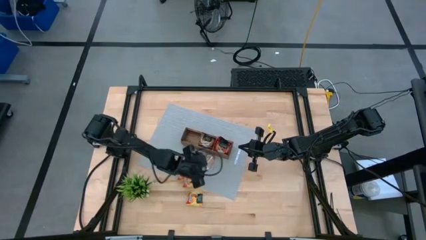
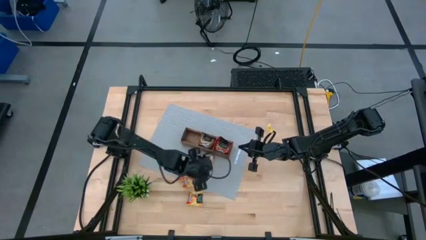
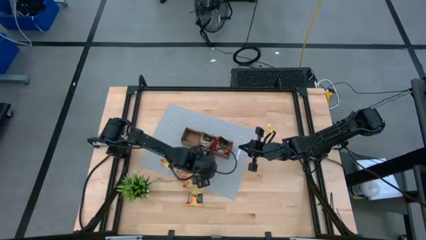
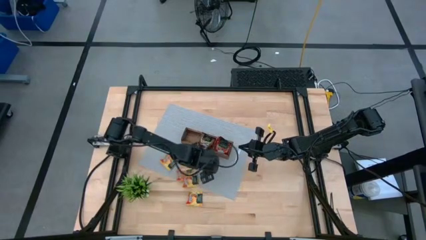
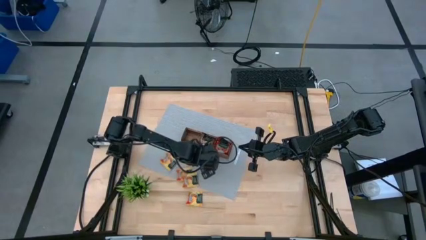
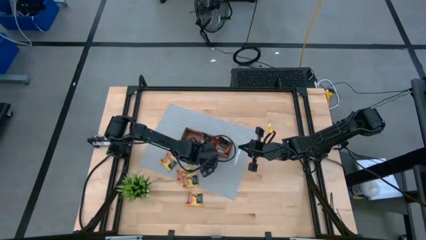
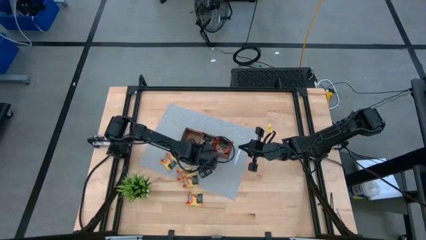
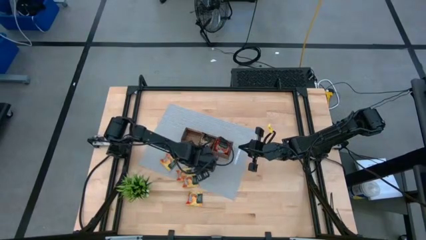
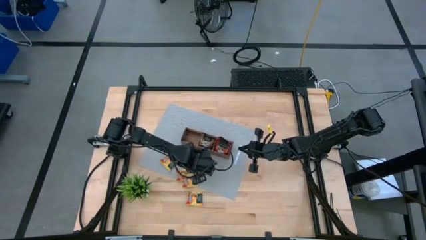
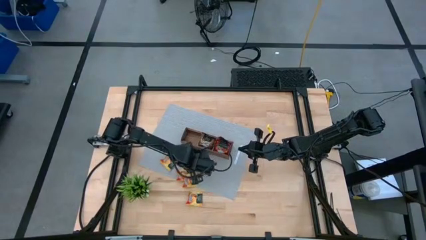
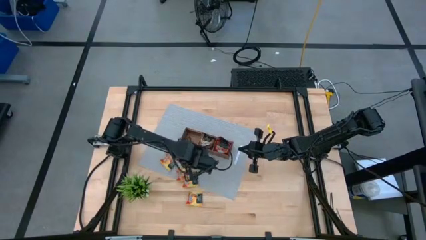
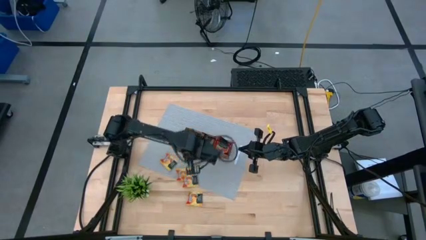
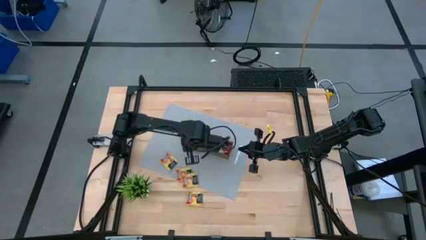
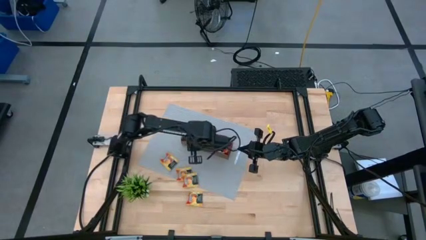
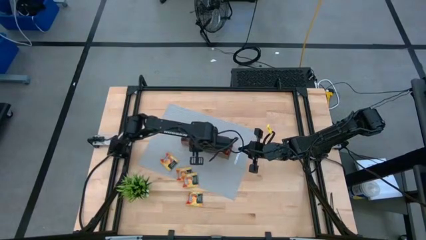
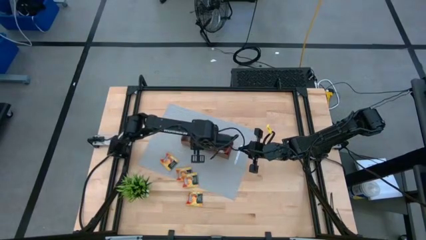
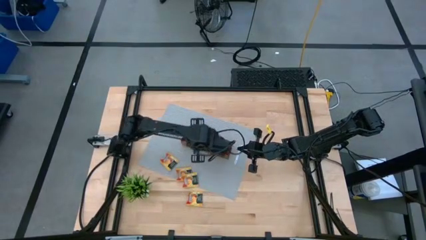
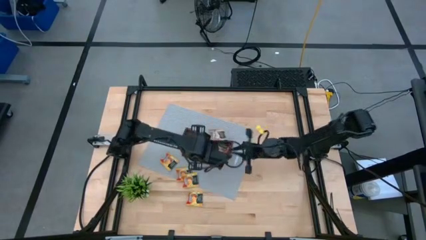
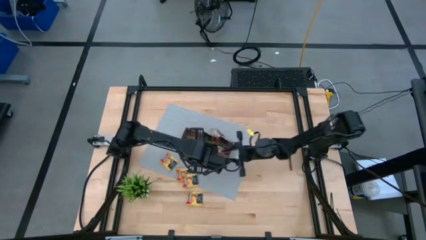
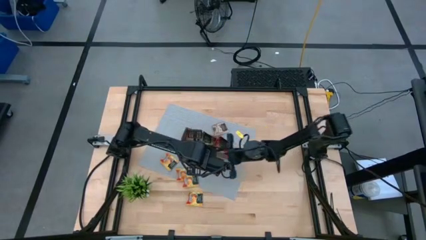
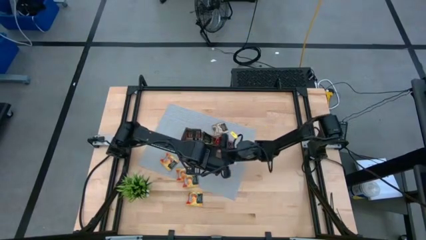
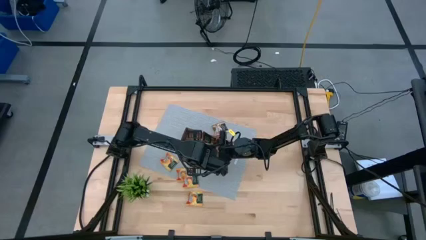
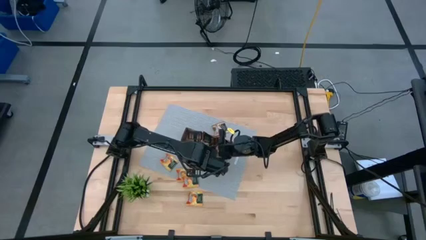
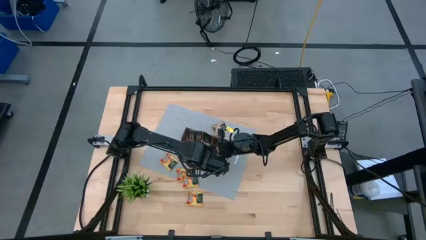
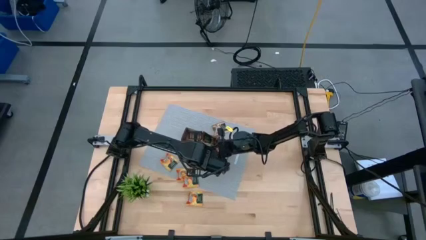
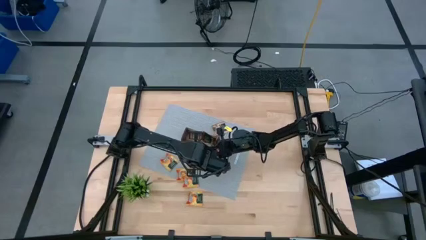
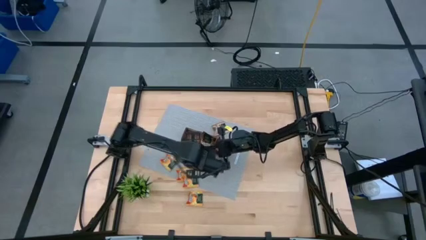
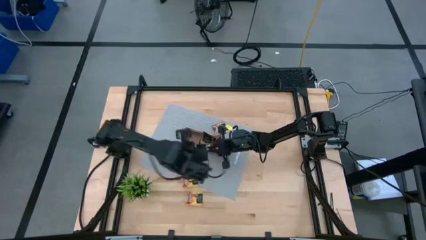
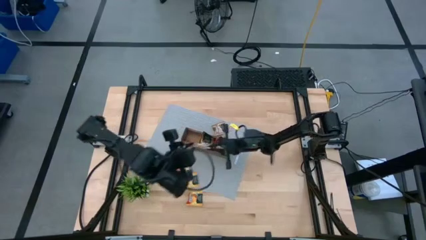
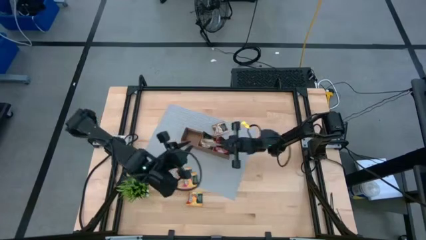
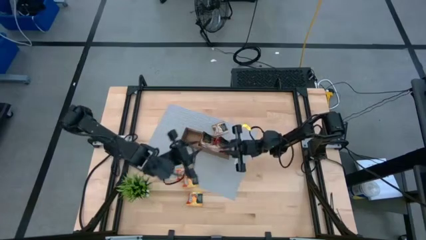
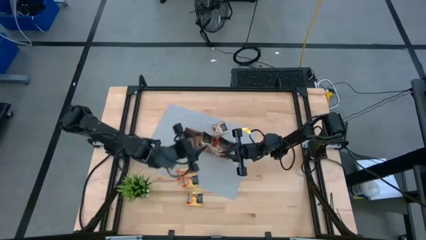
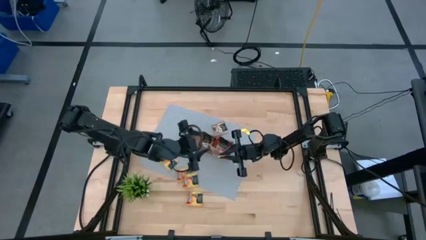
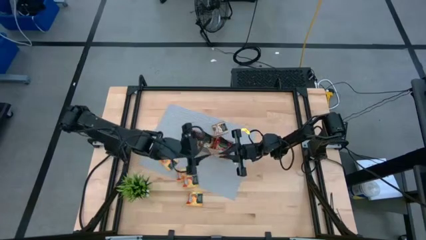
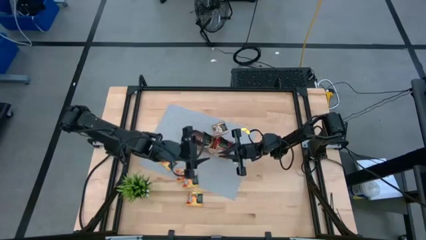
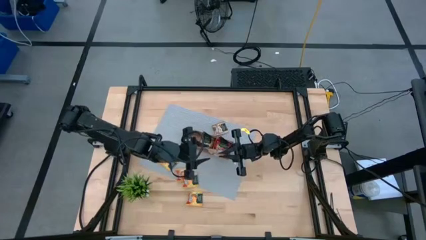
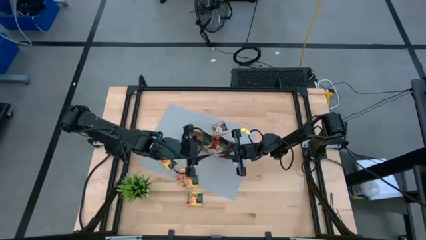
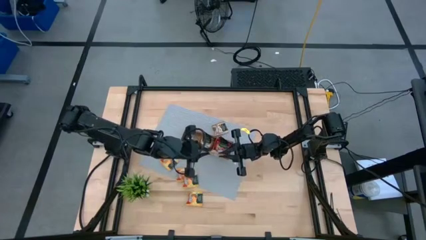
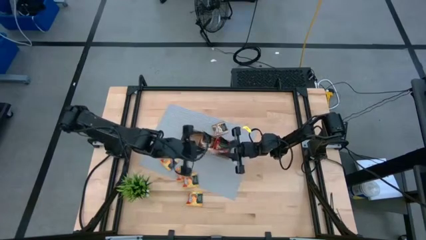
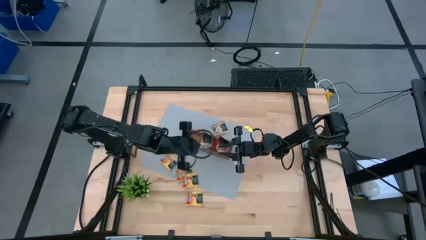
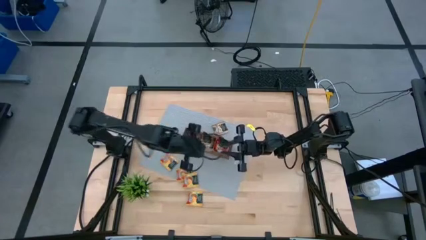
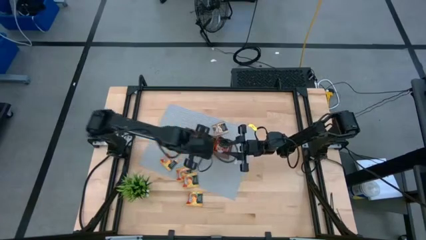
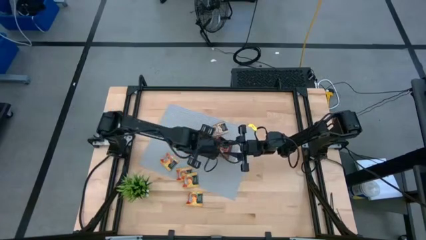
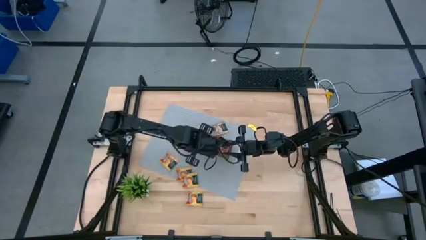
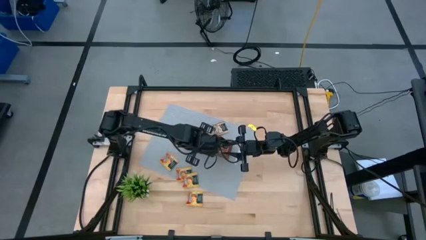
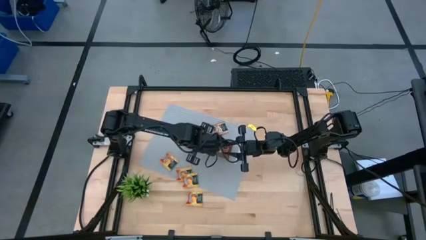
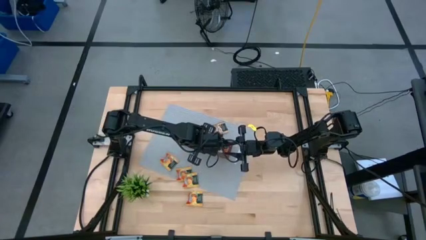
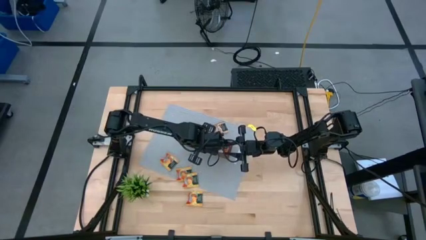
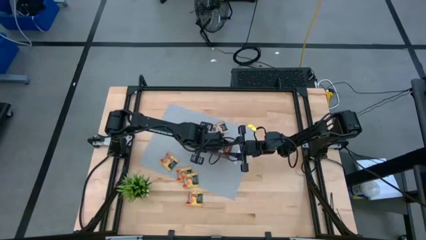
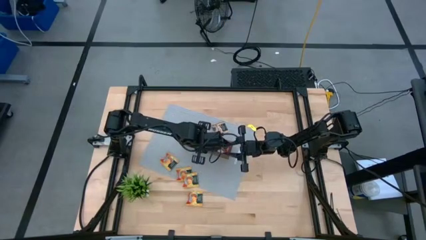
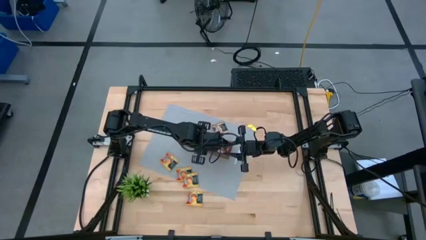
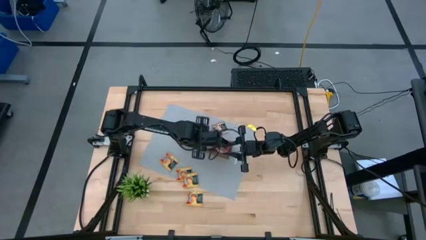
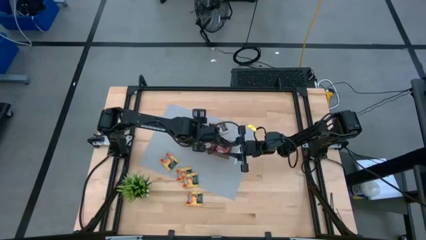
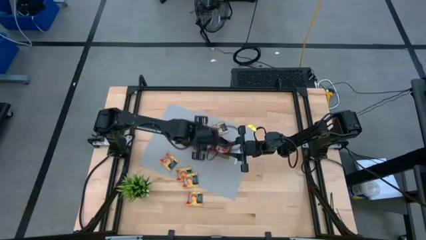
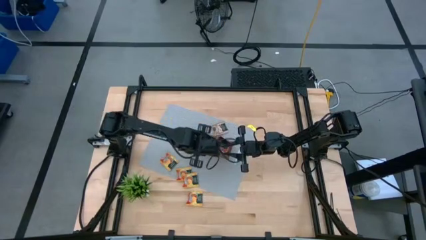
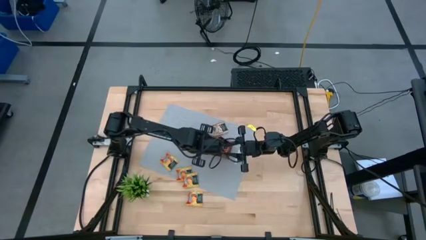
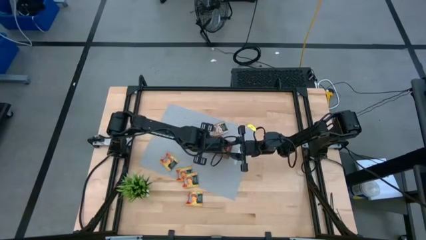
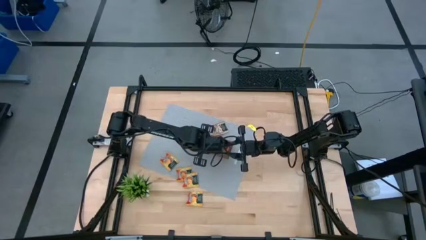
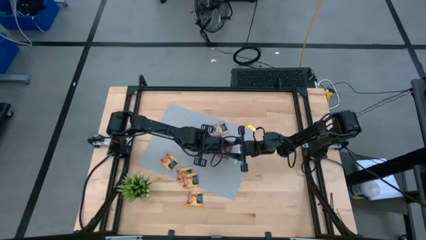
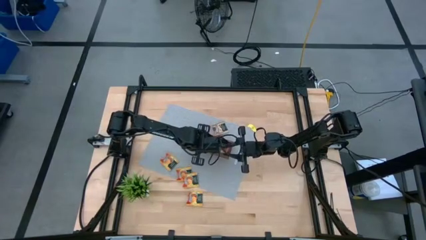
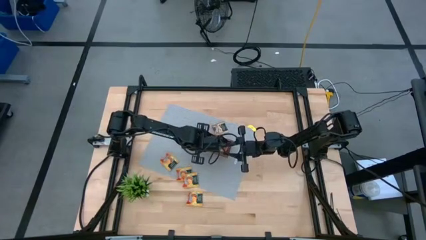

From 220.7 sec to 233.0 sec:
Task: Pick & Place Tea
Put the brown tea bag into the wooden organizer

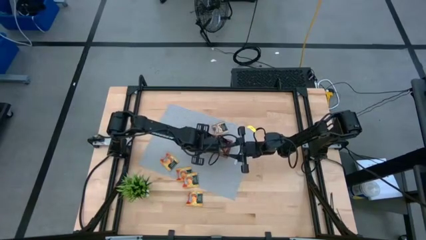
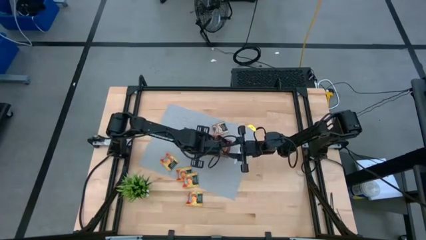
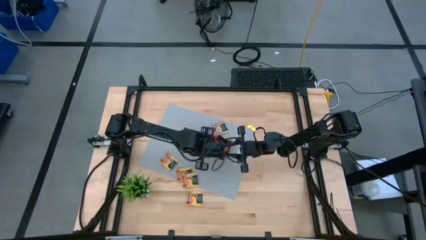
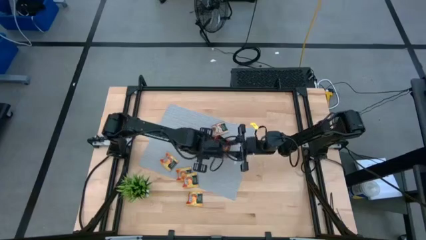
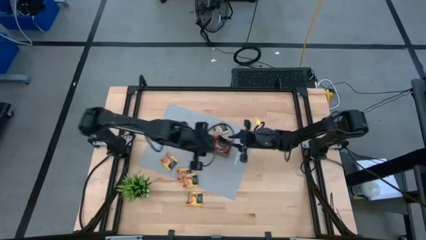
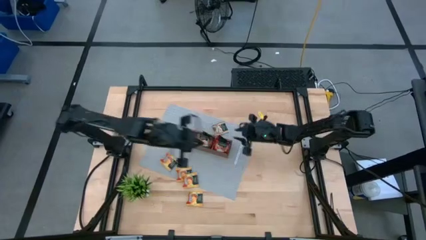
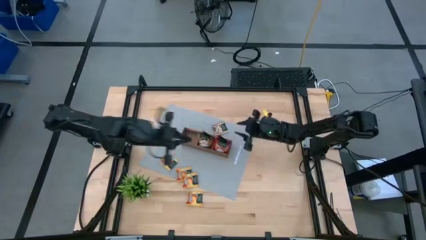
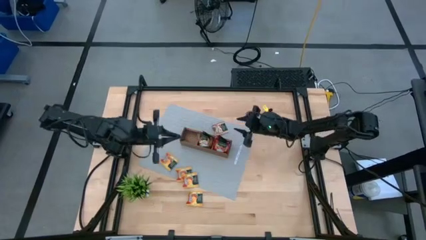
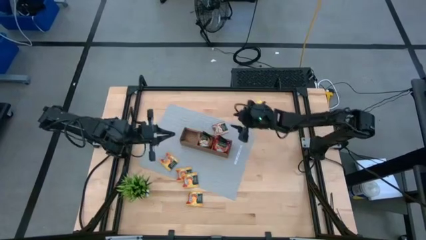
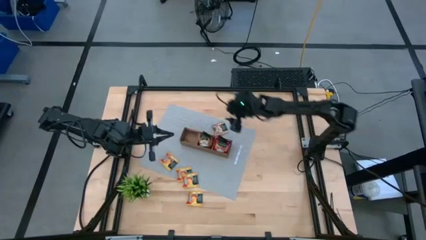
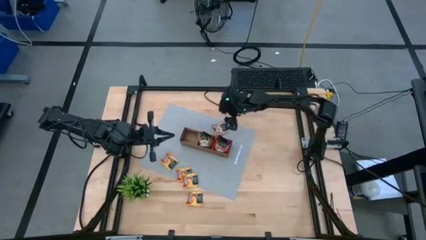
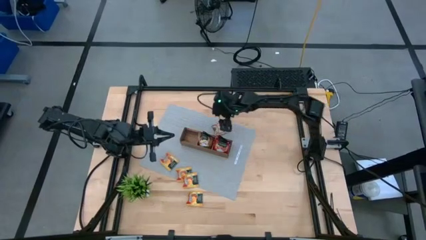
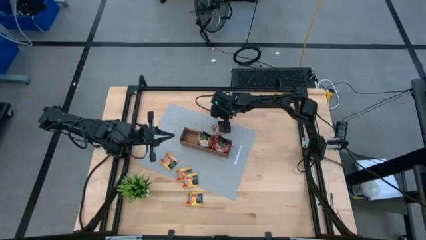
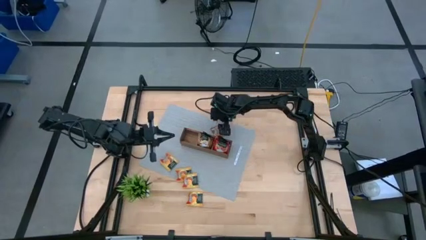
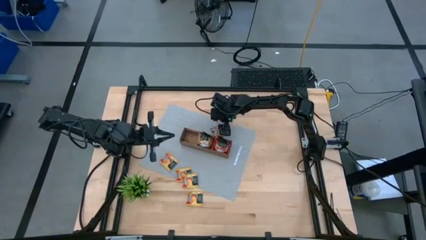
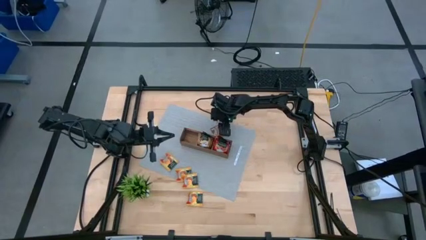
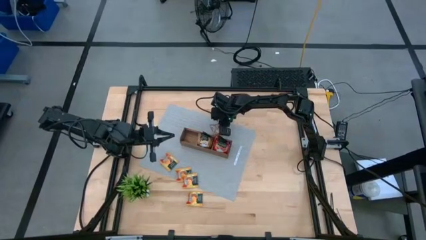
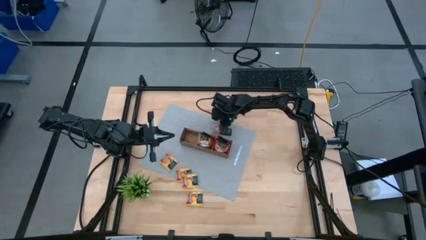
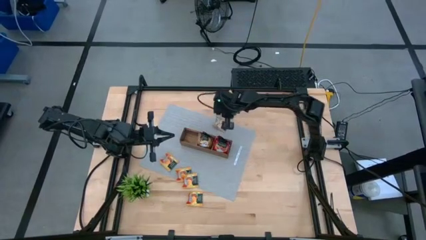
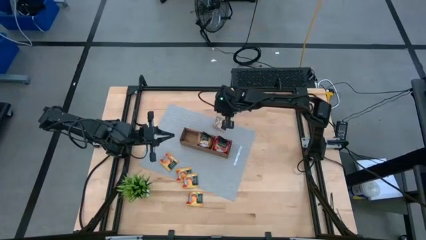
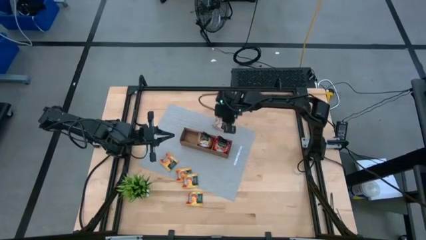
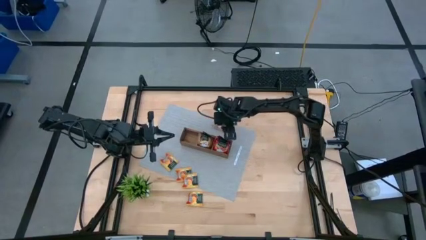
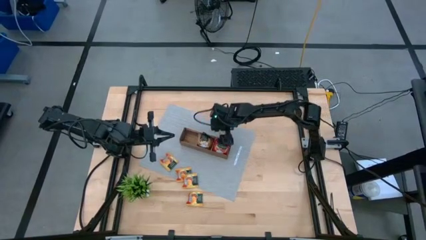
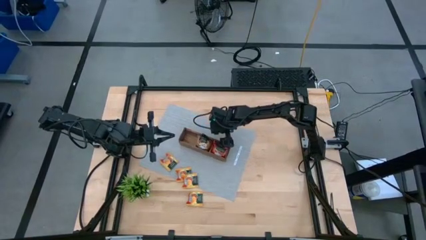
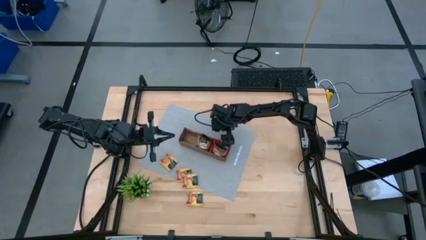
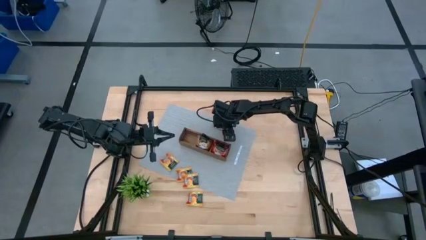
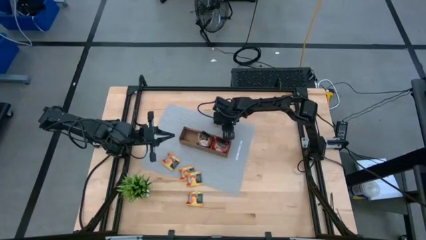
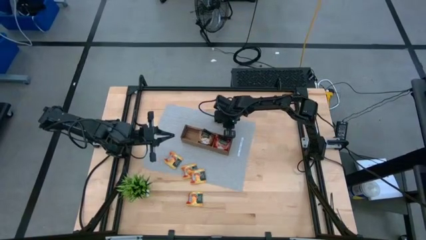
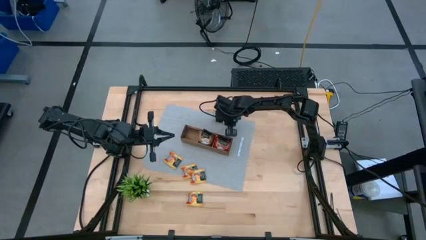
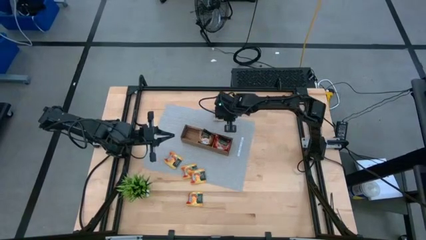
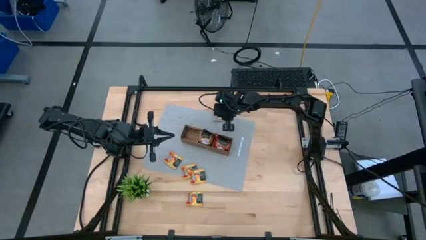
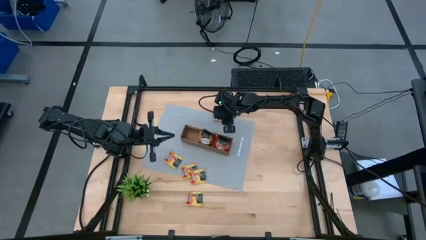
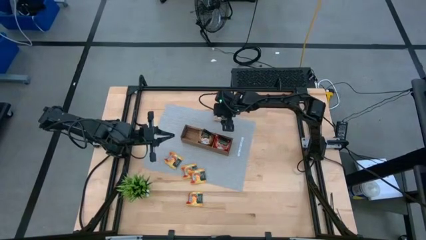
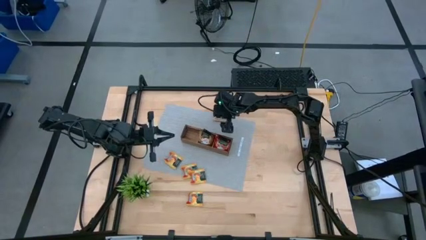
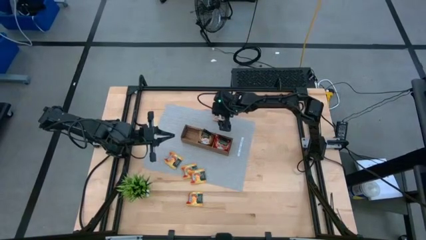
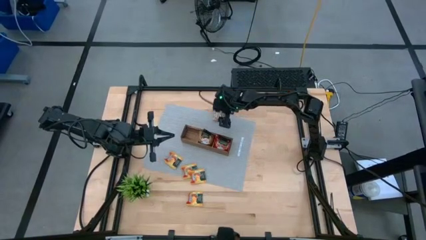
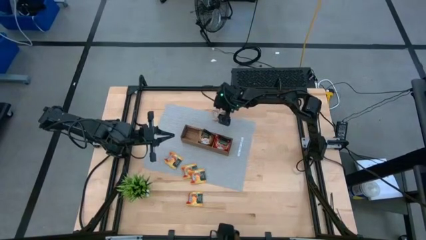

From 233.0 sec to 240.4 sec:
Put the brown tea bag into the wooden organizer
